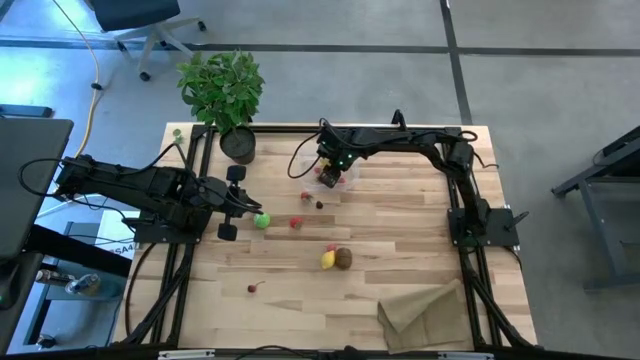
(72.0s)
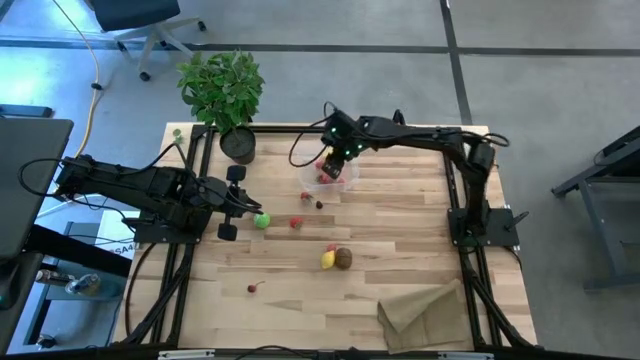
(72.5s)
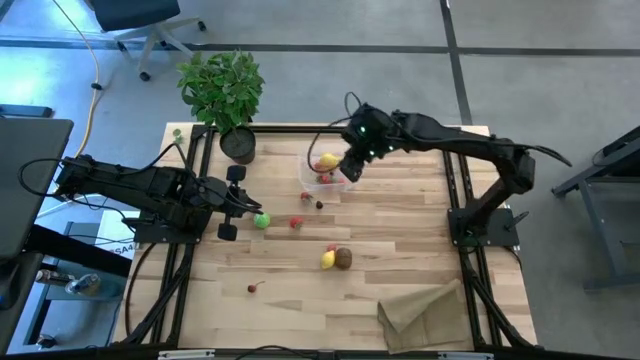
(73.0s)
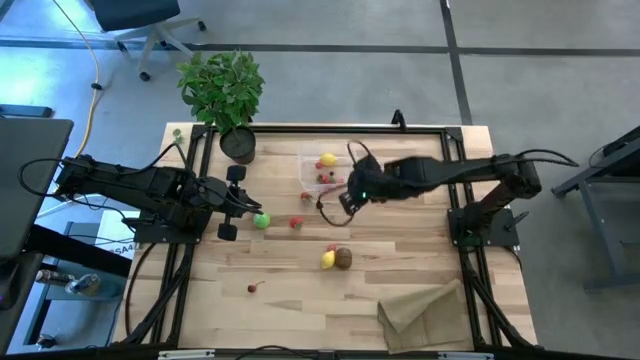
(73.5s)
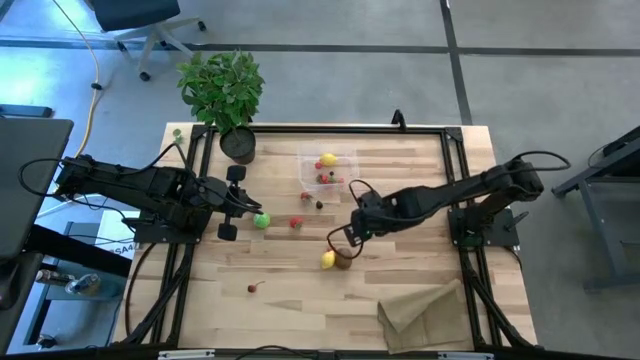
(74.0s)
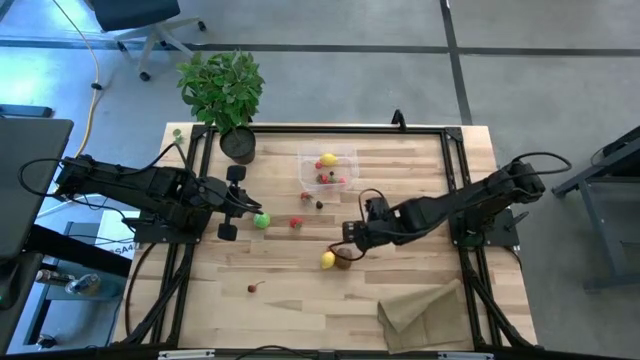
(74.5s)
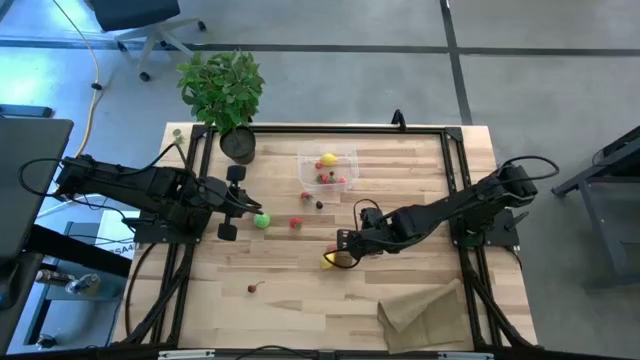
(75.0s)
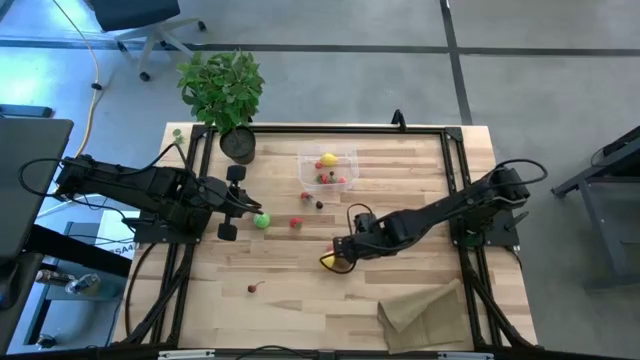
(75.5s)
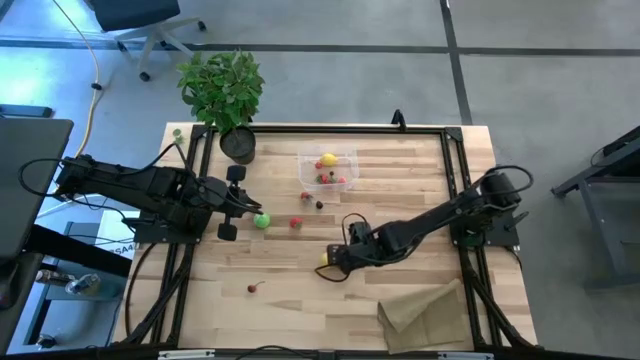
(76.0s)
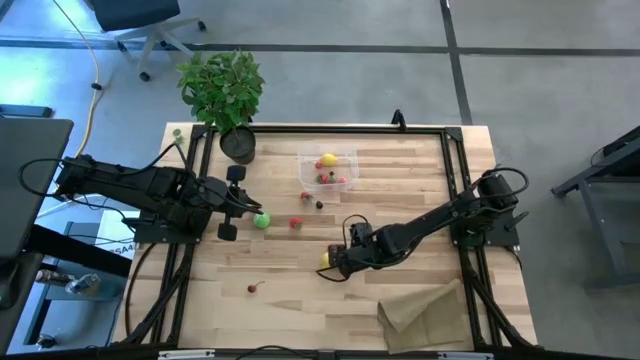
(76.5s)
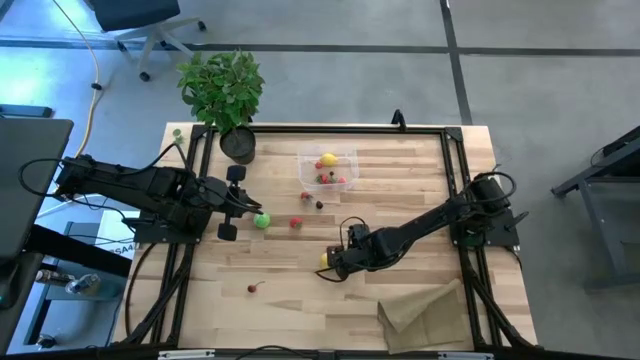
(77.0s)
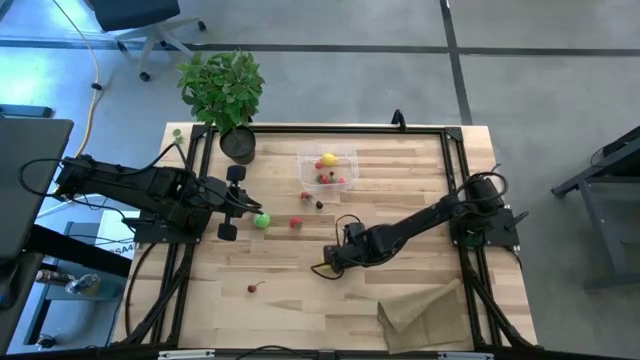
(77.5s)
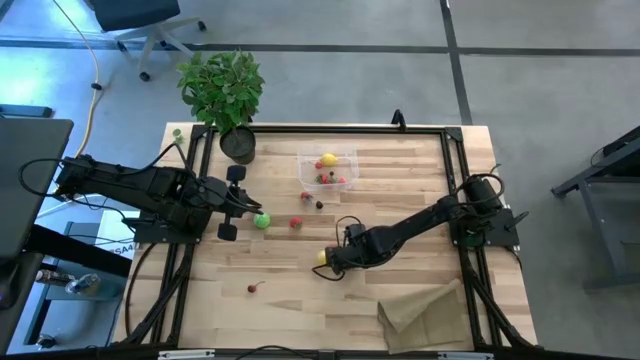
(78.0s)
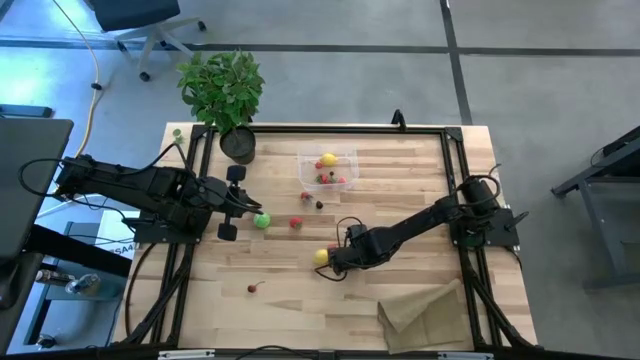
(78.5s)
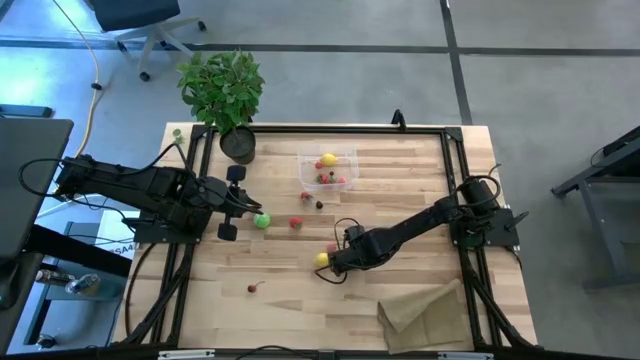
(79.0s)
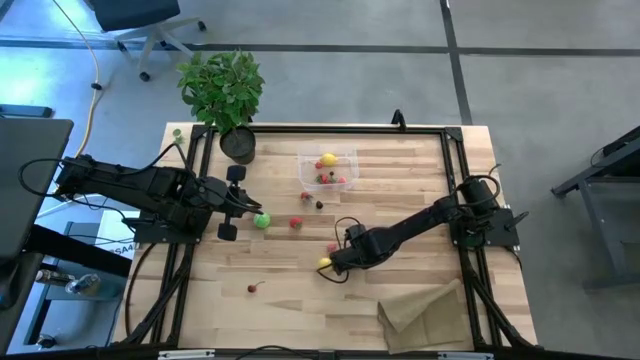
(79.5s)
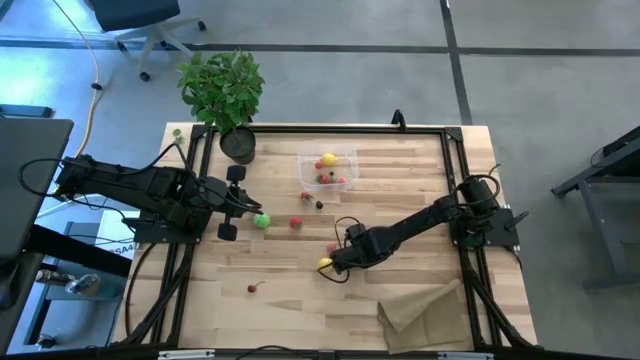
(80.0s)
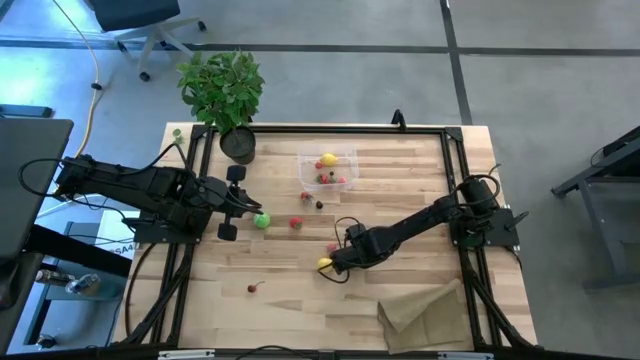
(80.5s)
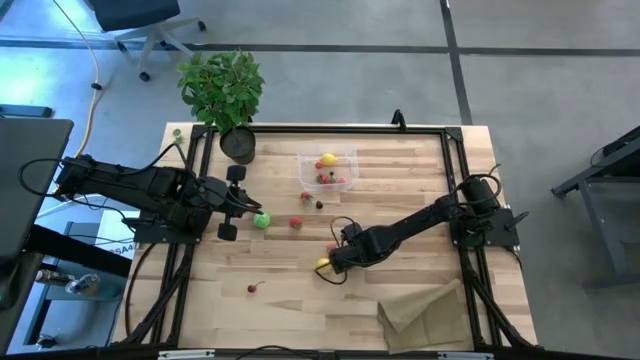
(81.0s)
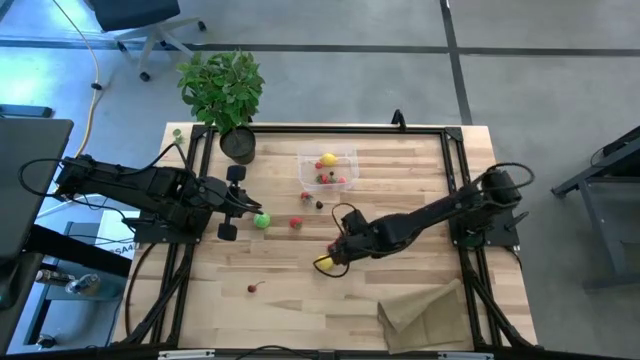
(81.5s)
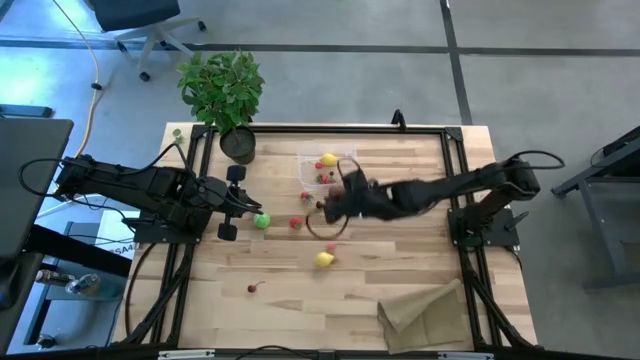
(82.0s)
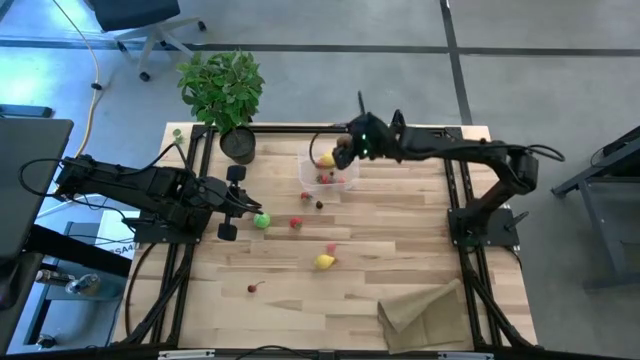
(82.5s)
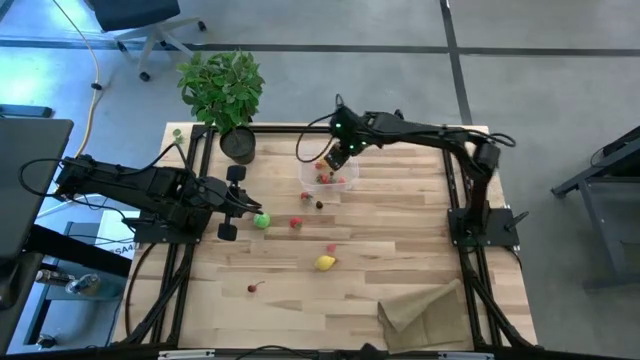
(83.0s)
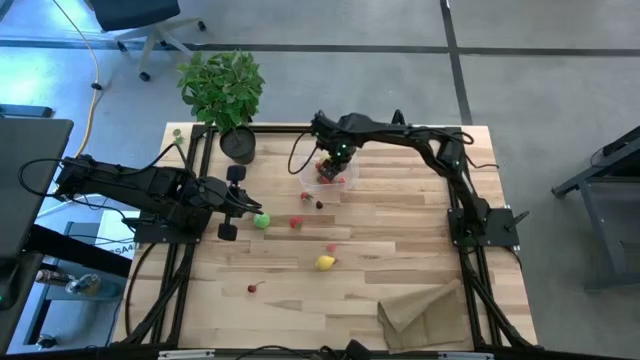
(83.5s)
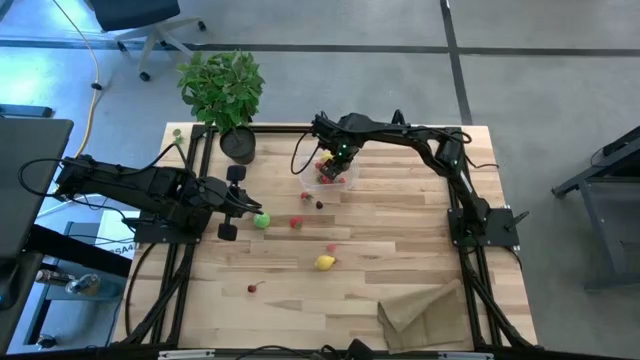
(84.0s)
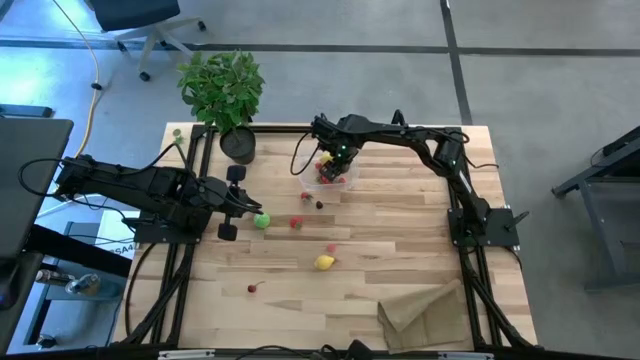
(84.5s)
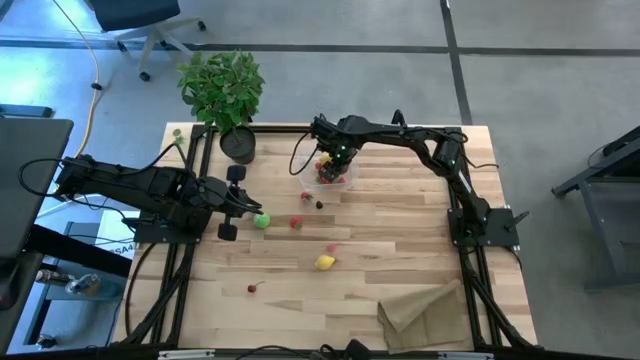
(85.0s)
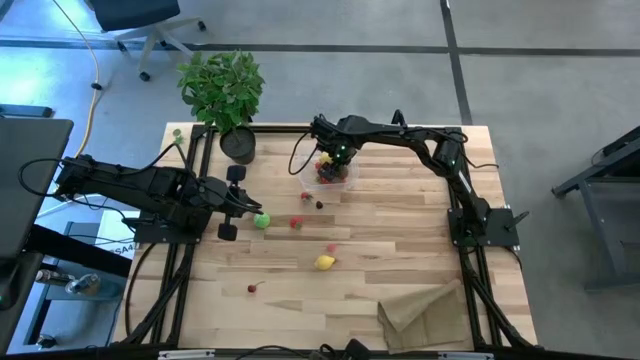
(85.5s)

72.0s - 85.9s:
Task: Pick and placing Produce into tupperware
Put the kiwi into the transparent bin

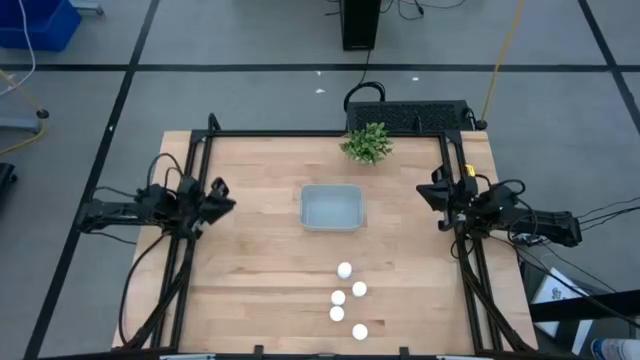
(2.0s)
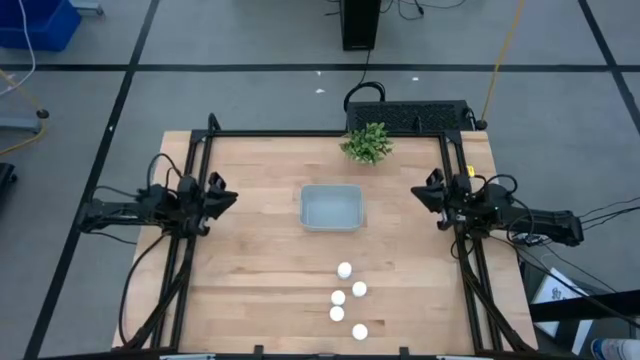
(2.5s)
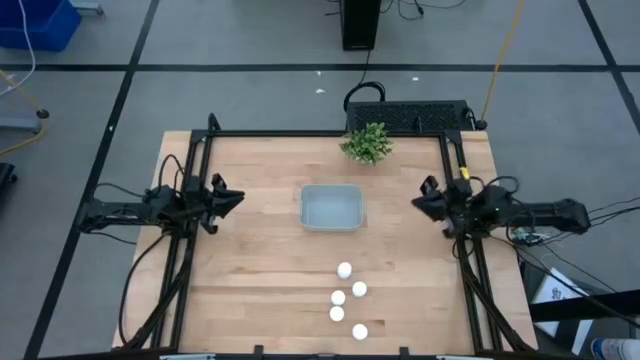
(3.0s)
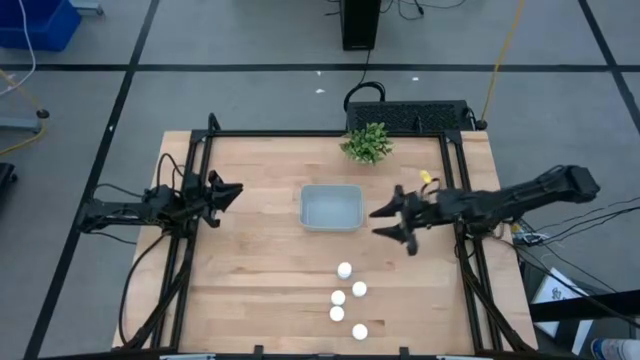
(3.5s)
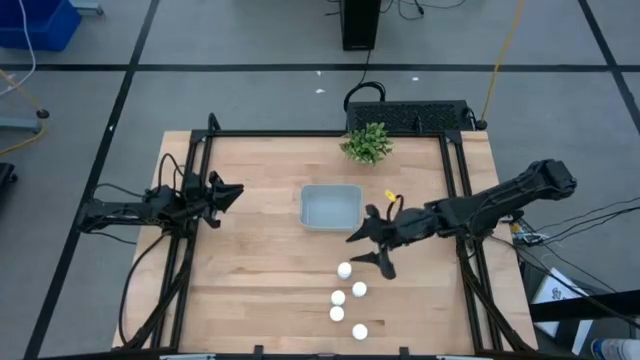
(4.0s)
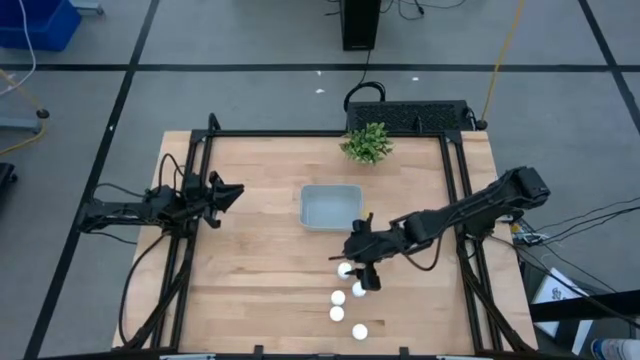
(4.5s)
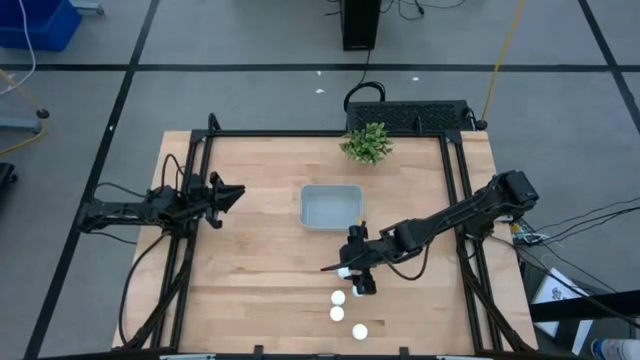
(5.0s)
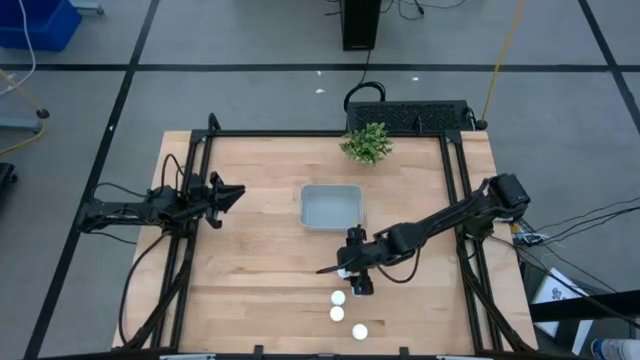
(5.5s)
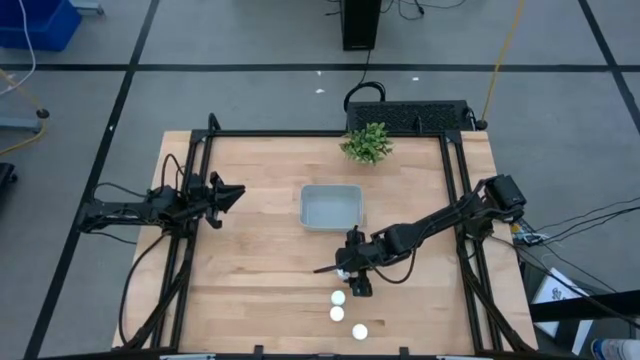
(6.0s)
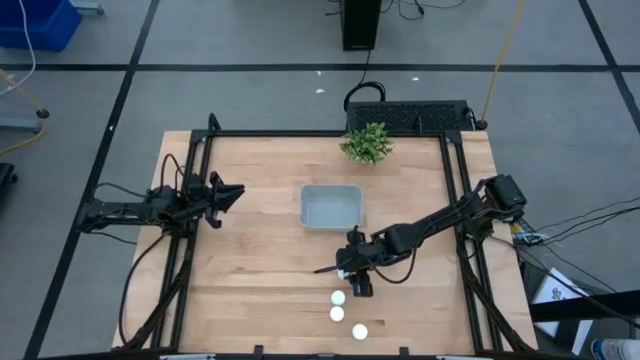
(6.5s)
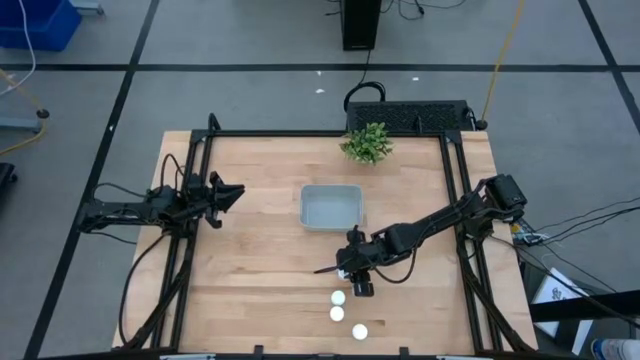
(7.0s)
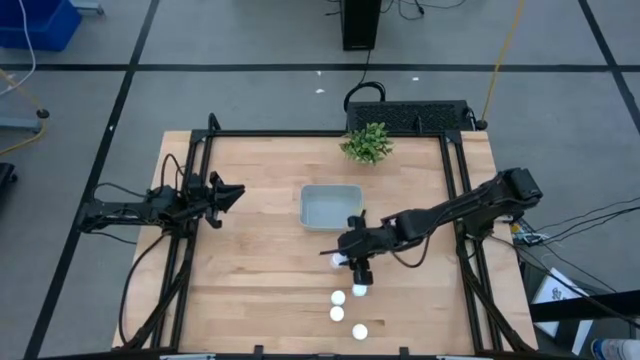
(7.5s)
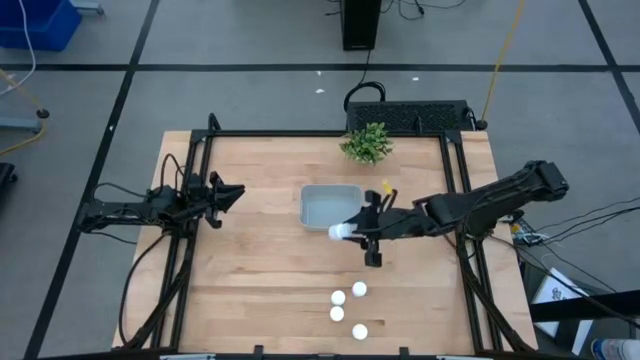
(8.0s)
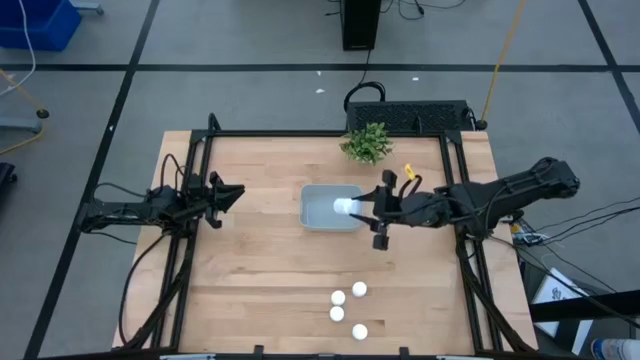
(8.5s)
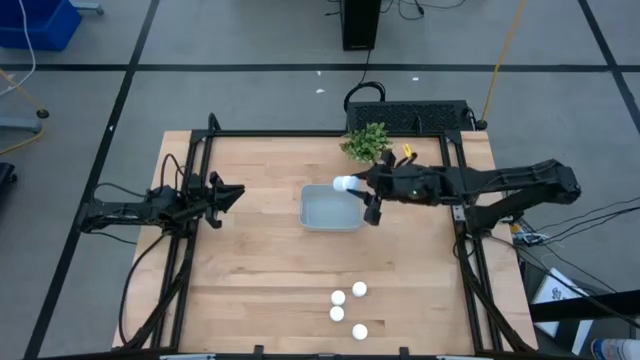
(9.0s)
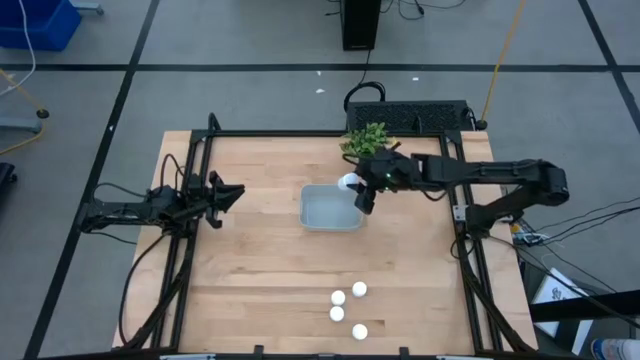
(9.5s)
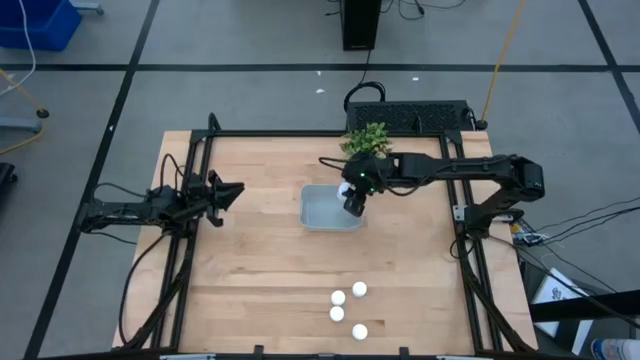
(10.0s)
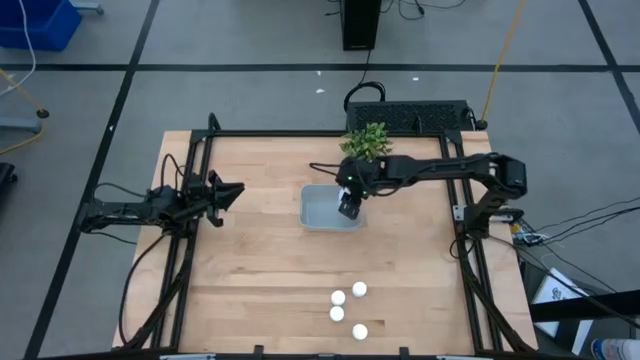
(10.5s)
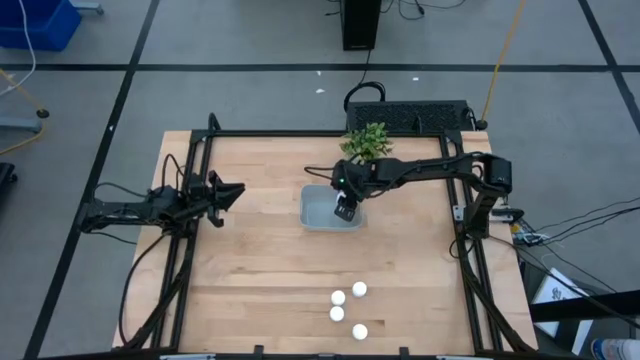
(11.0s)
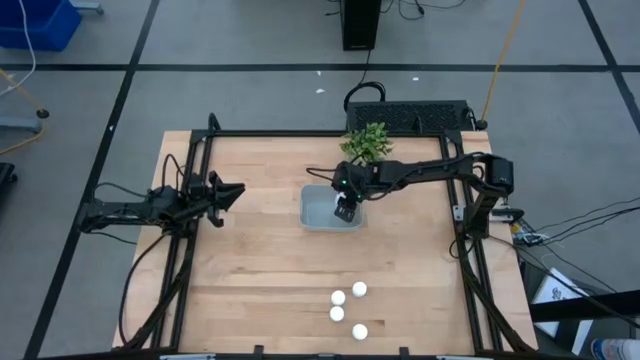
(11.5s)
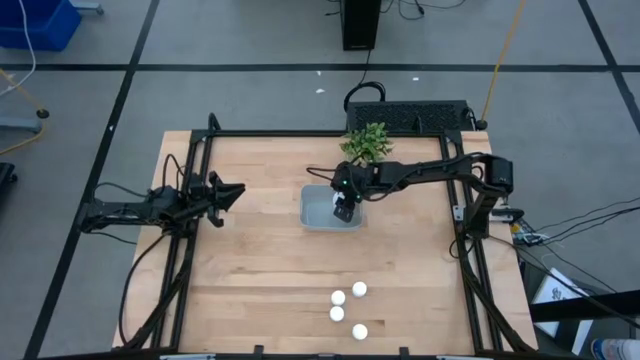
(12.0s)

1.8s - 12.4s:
Task: Pick and place pill bottles into a basket
Put the white pill bottle into the gray bin
